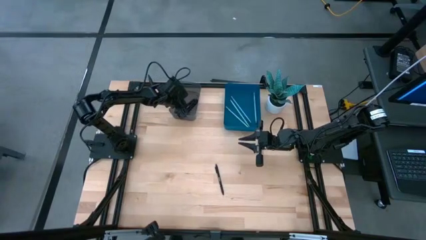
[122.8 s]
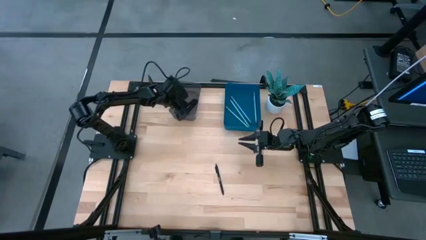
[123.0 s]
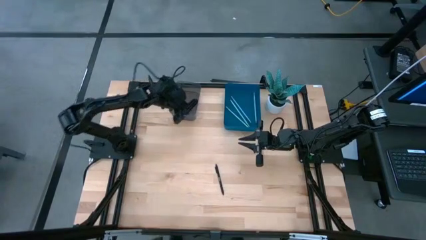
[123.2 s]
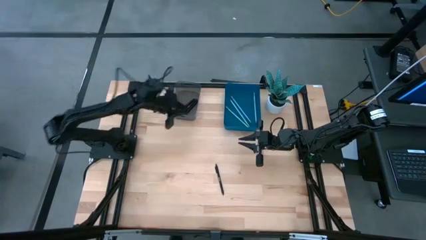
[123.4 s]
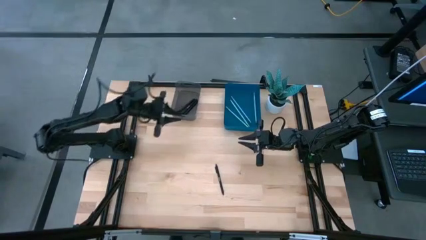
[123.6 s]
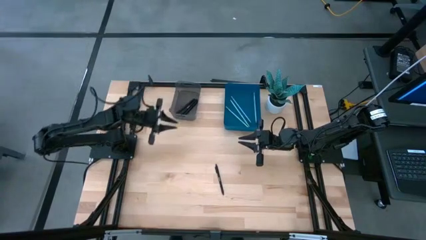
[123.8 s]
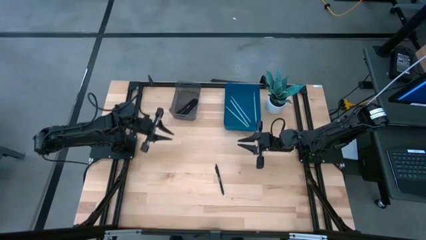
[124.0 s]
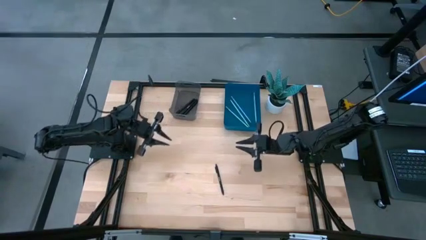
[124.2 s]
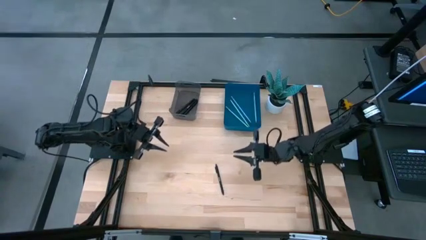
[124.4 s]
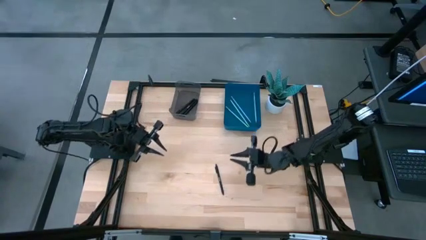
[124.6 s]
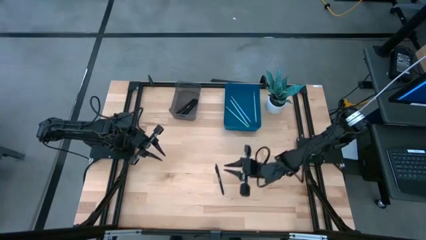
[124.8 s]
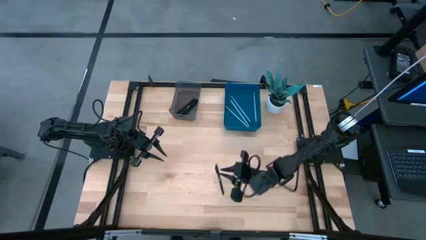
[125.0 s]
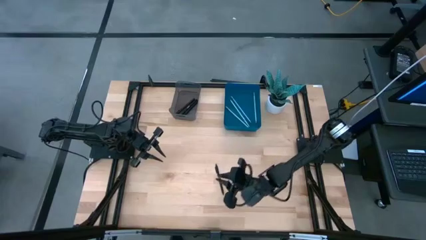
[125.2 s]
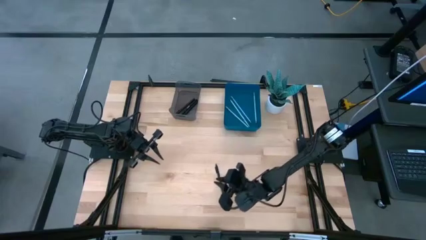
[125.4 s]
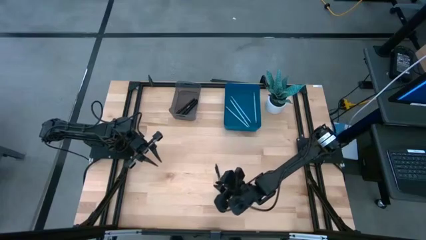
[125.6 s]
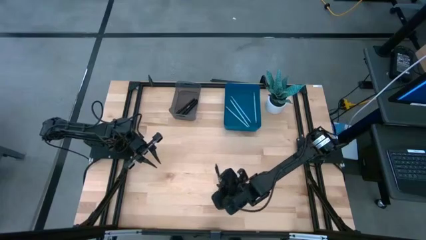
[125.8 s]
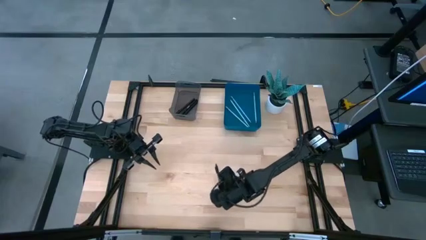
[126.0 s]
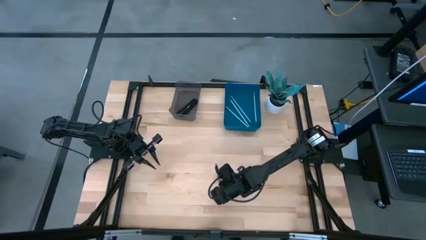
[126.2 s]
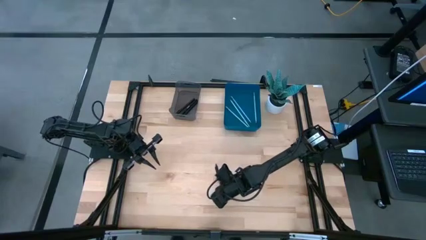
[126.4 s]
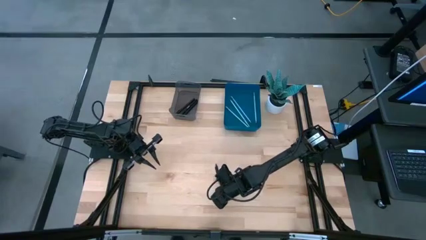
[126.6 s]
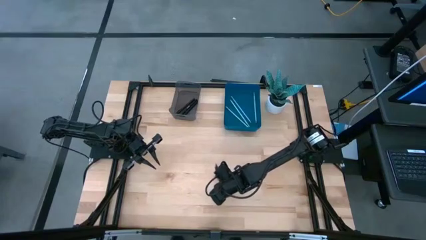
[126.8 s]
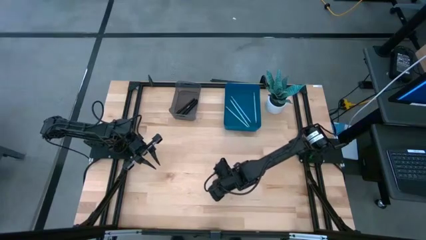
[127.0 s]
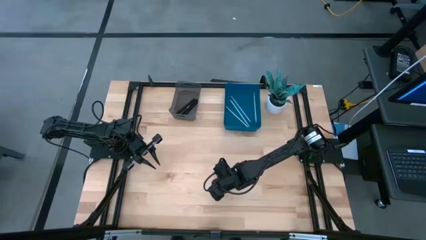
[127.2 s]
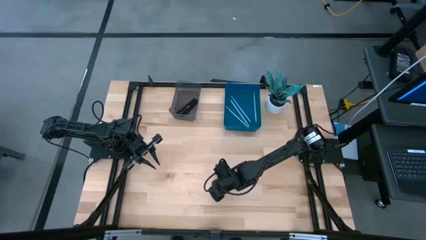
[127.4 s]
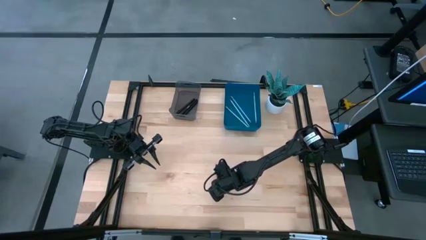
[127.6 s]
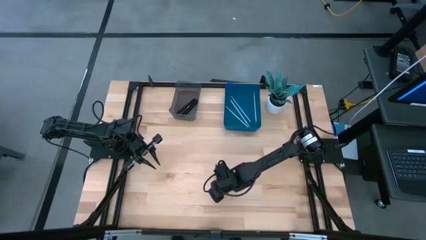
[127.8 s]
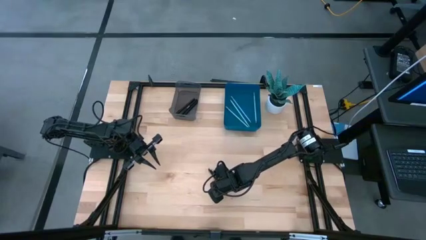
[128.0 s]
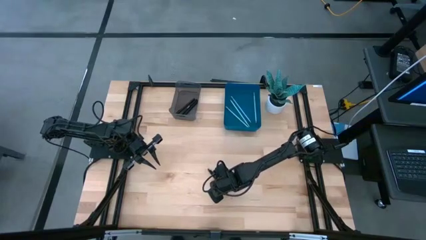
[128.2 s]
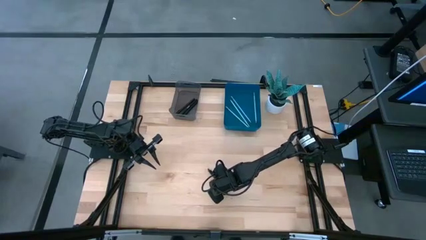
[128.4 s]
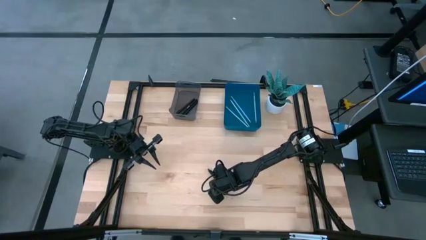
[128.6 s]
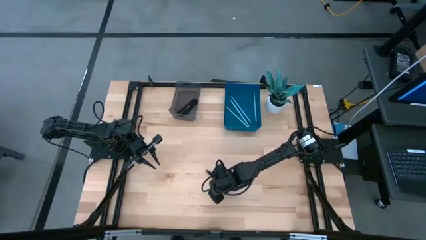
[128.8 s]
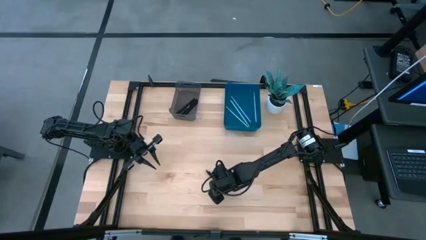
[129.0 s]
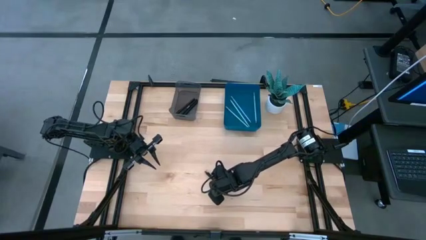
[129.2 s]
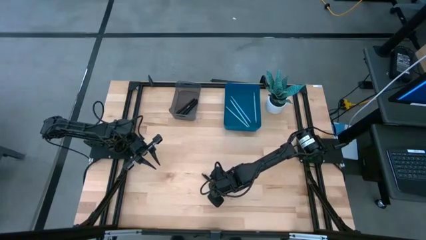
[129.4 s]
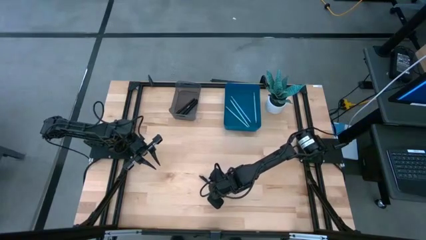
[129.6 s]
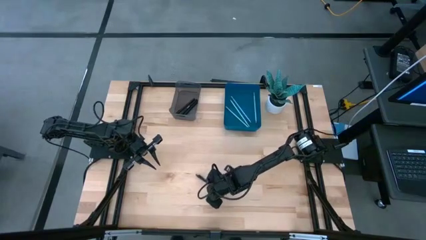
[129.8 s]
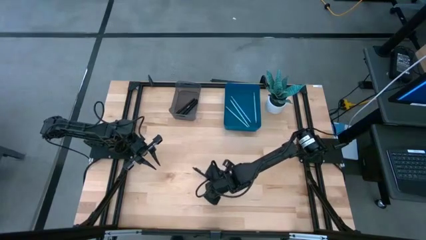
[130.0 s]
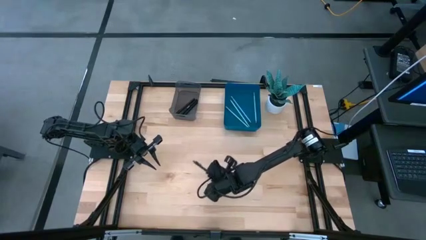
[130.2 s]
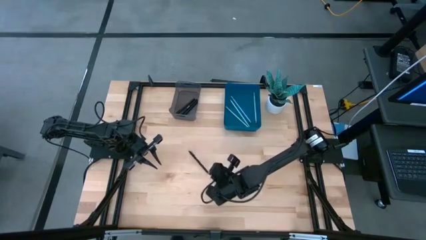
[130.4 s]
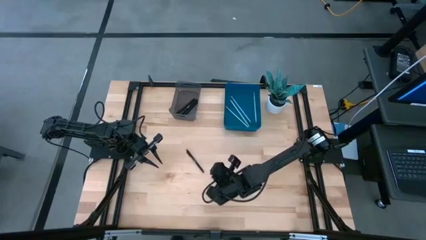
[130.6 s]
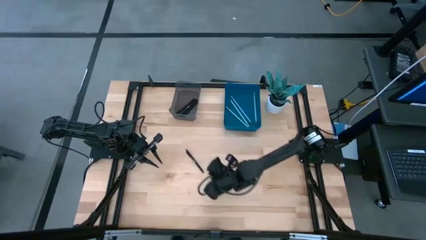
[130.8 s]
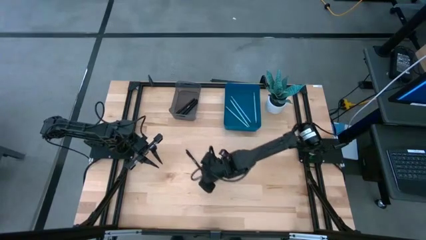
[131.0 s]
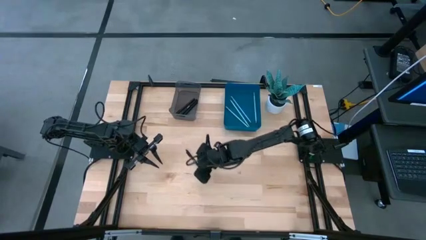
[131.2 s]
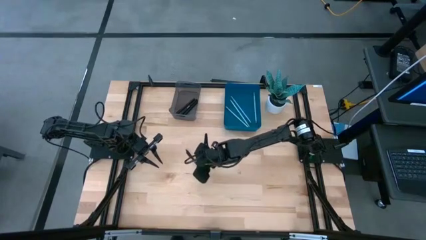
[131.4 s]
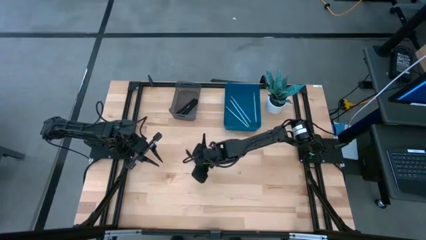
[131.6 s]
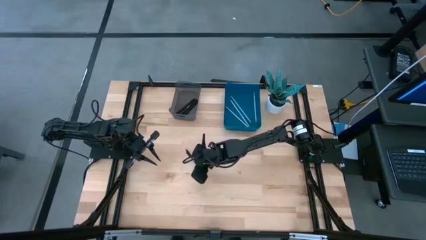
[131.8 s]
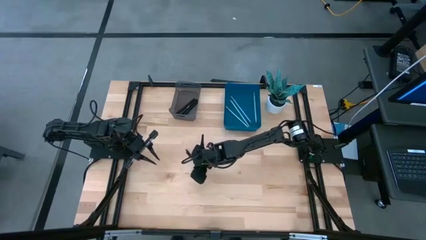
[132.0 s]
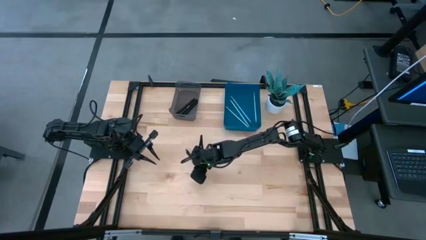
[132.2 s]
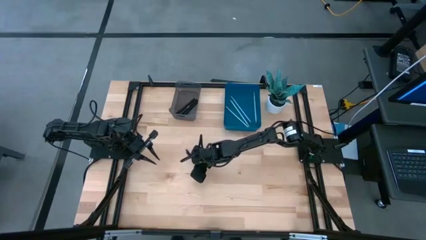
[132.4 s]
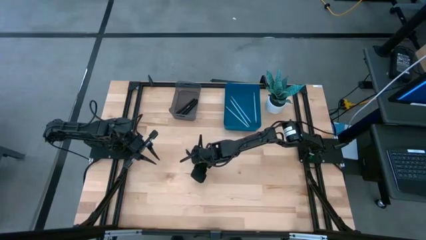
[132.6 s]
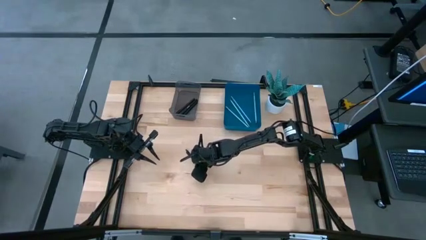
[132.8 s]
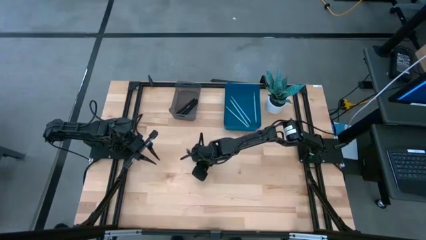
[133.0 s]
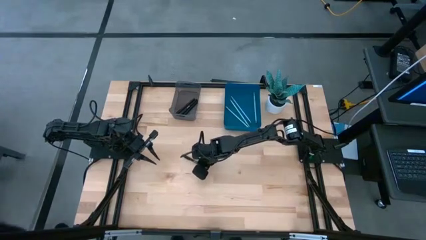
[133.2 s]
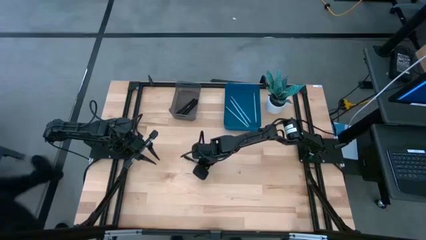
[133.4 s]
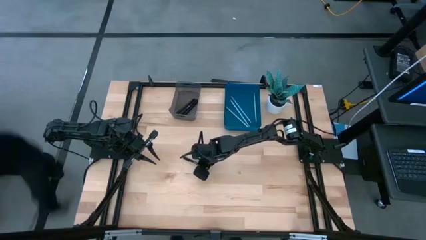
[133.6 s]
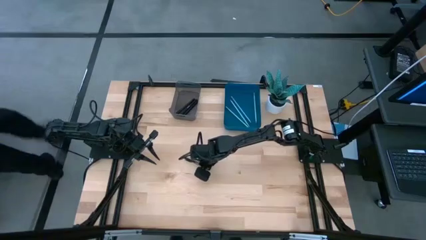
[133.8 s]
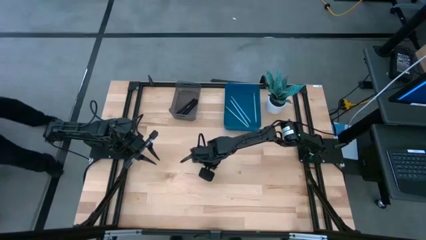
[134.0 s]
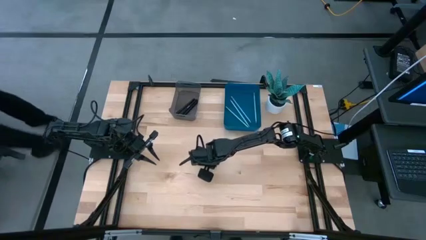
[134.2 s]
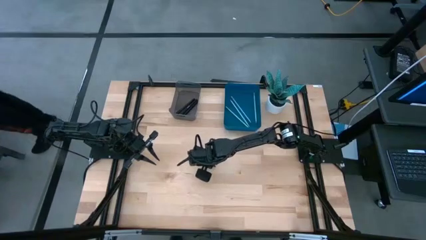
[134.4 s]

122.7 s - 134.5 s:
Task: Sort pens & pencils
Put the black pen into the black bin

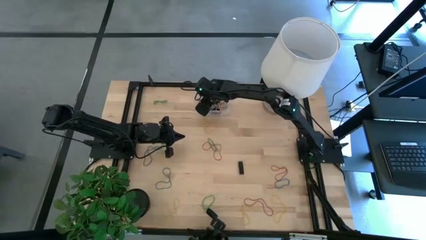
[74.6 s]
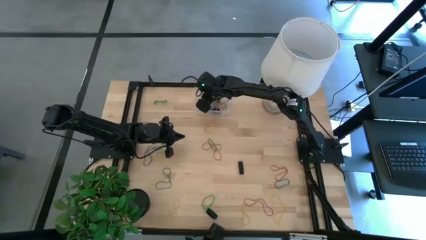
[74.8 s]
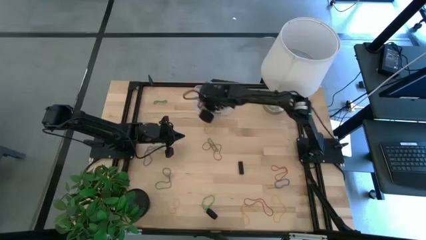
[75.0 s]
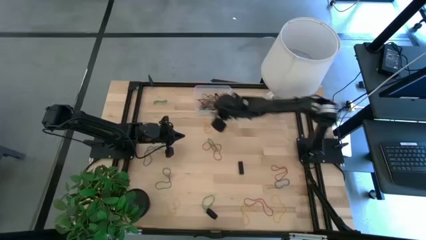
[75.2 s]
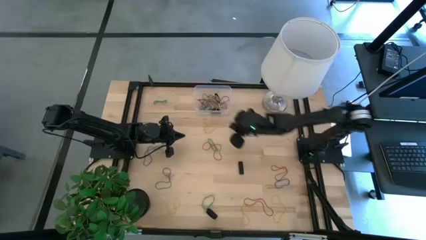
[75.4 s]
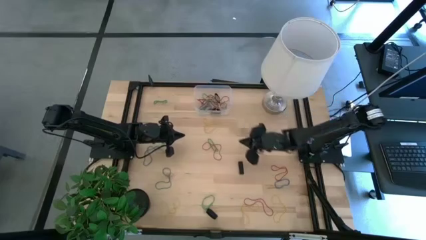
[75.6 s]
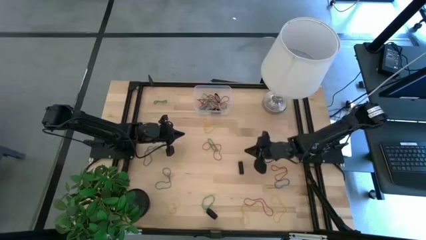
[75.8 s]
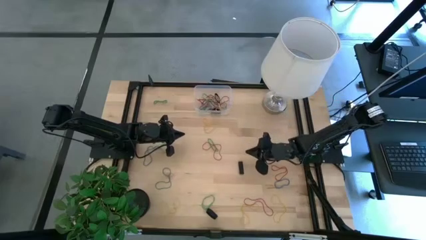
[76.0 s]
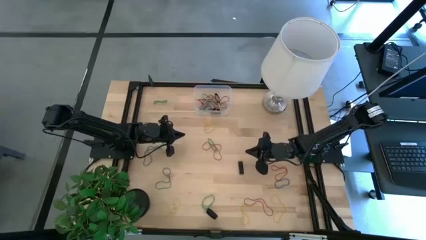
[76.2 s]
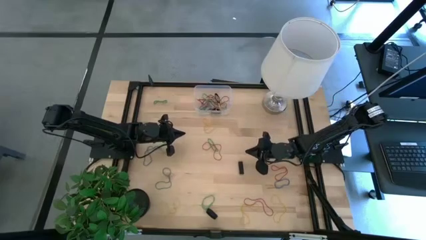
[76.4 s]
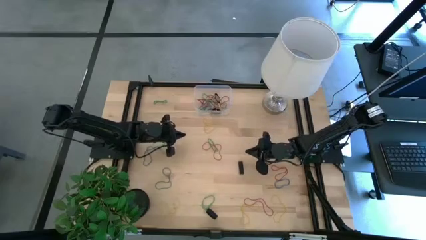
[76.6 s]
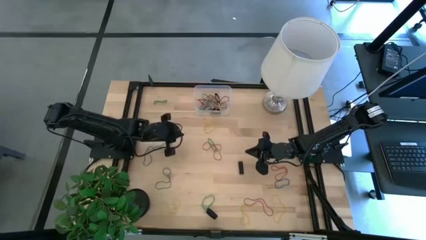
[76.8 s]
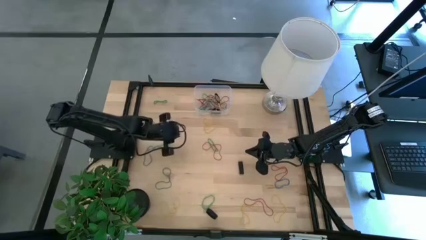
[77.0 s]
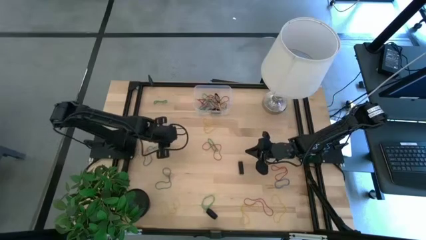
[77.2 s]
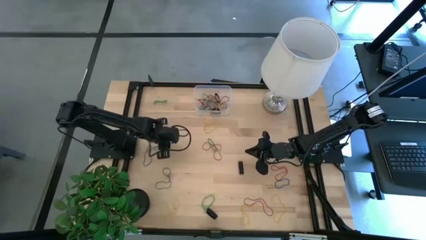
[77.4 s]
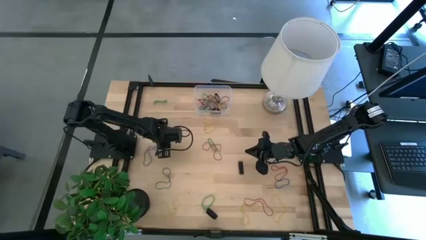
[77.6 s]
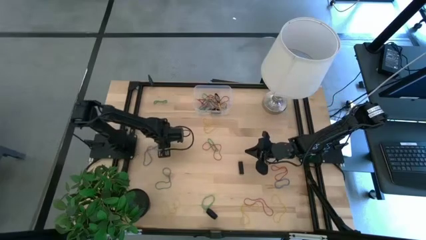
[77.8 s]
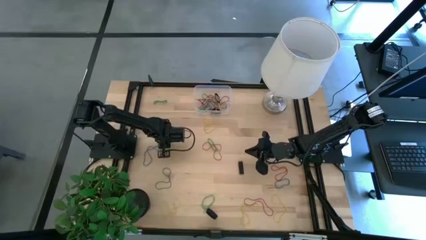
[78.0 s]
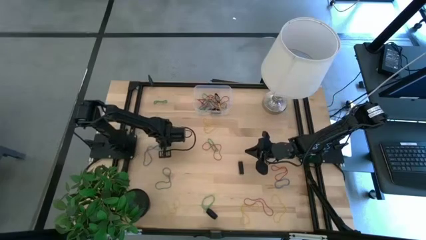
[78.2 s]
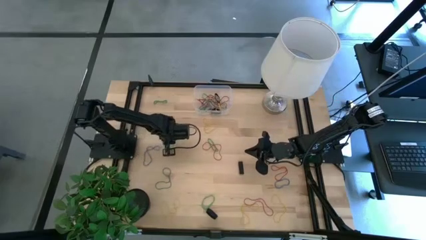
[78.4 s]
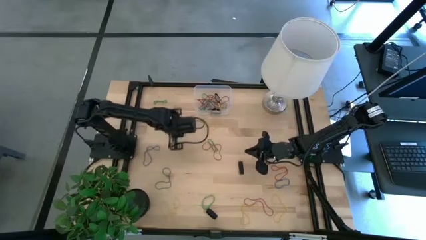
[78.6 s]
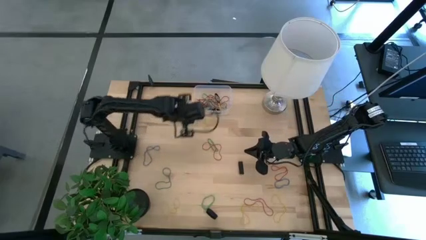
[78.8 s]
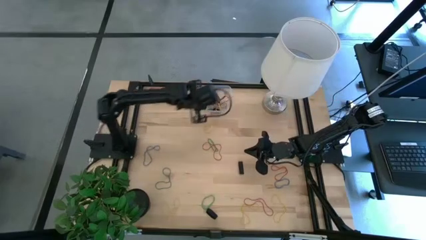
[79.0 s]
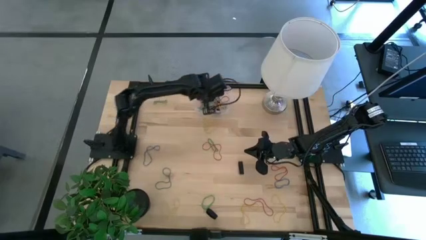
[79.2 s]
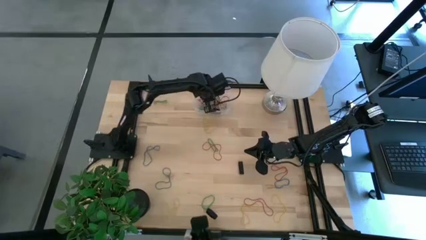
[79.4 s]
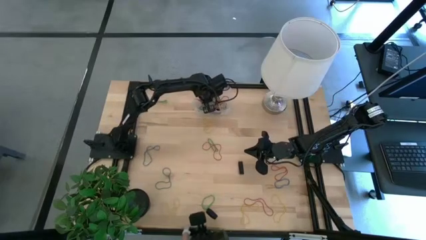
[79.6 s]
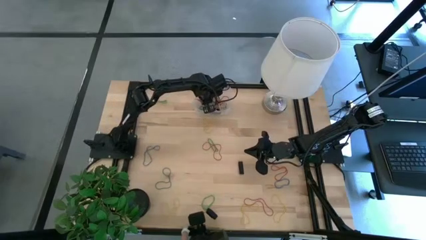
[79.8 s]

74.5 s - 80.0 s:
Task: Pick and place rubber bands into bin
Put the green rubber band into the transparent bin
